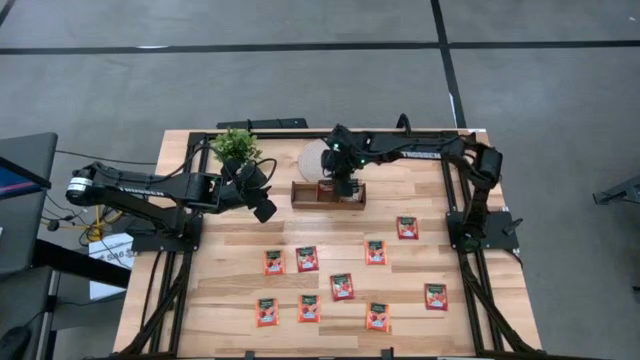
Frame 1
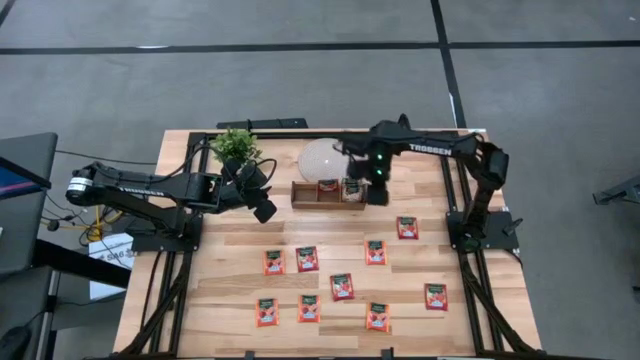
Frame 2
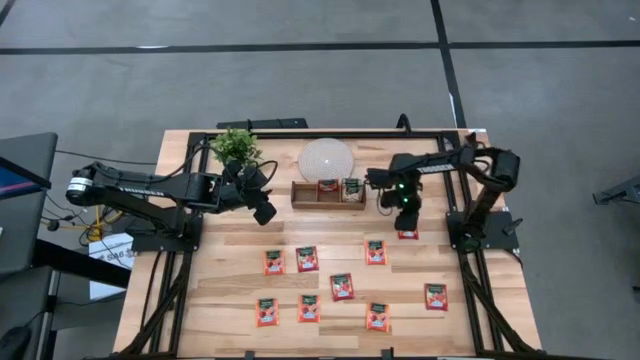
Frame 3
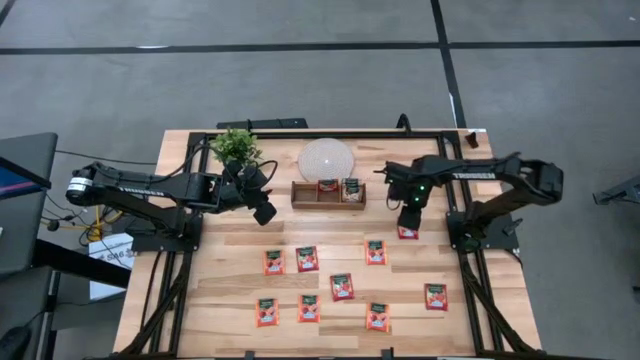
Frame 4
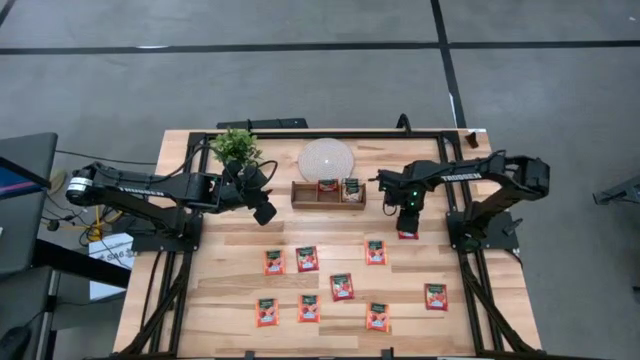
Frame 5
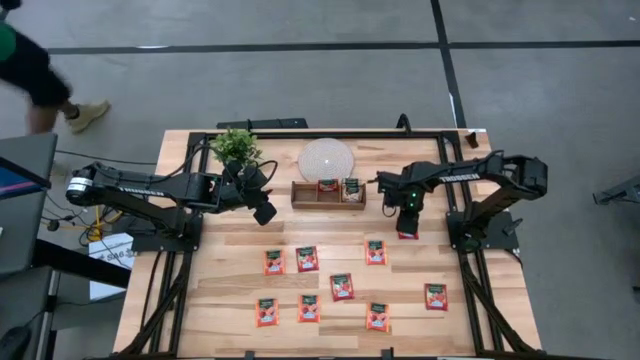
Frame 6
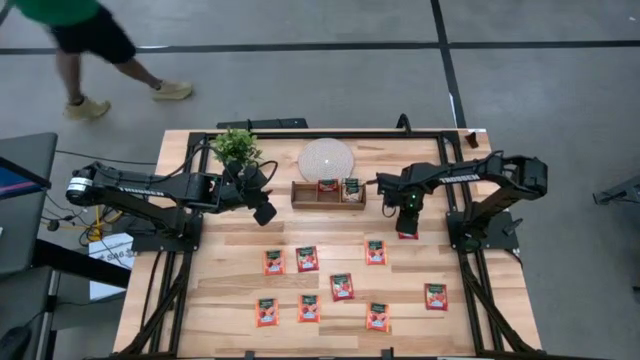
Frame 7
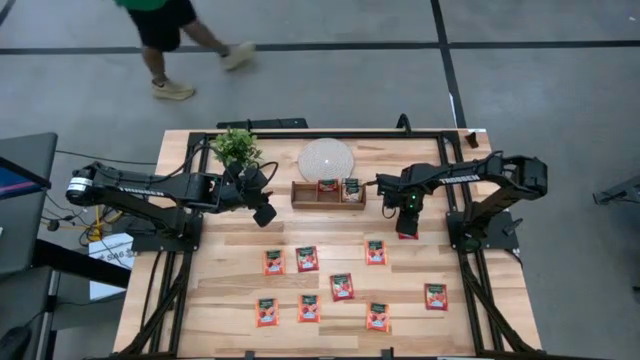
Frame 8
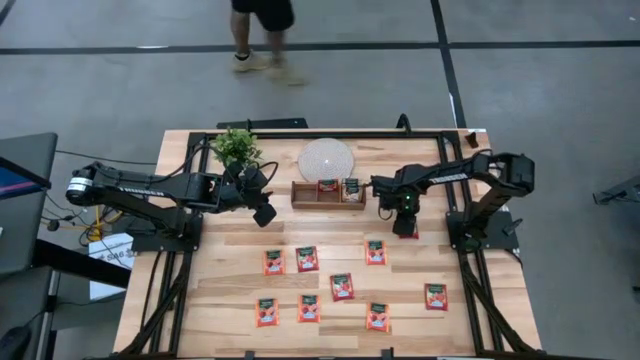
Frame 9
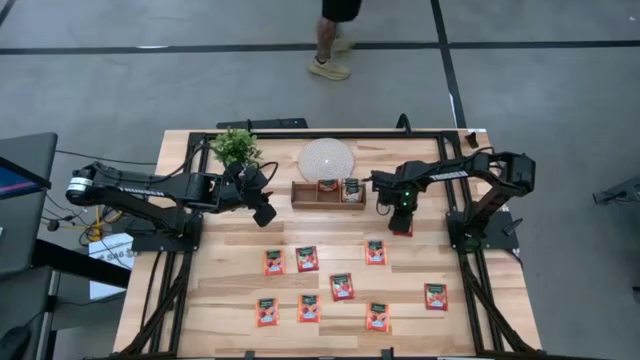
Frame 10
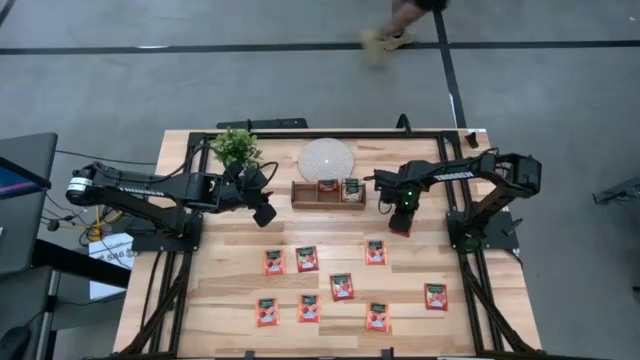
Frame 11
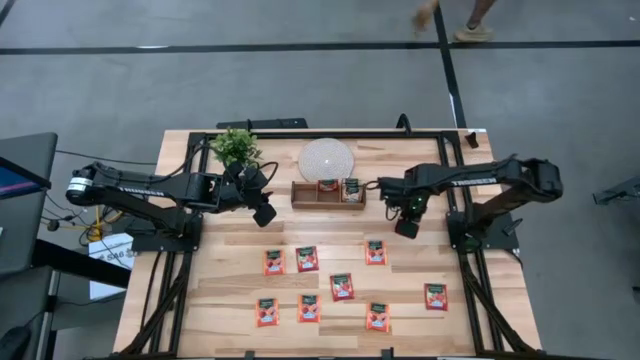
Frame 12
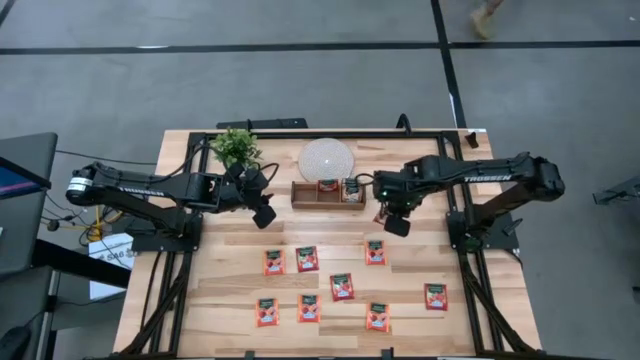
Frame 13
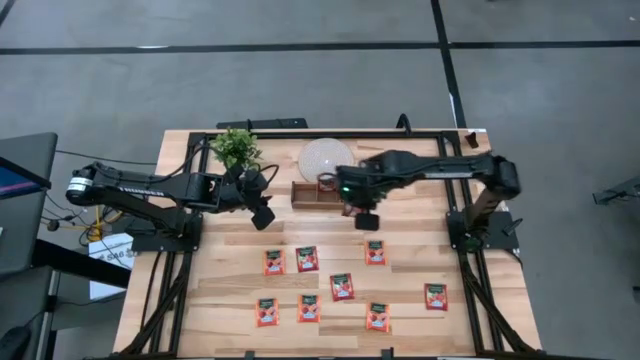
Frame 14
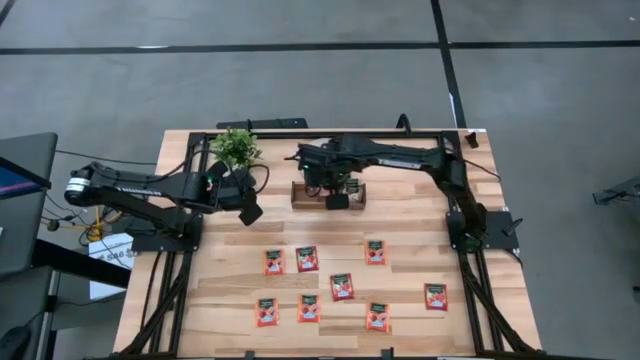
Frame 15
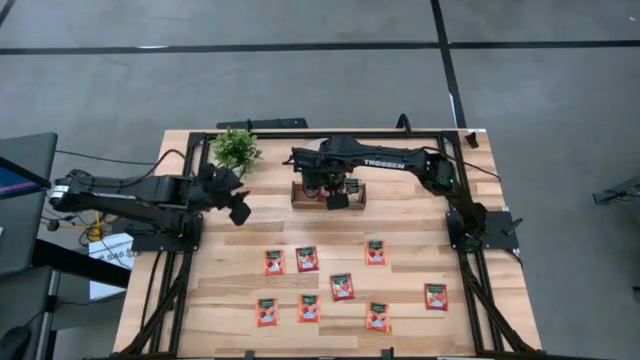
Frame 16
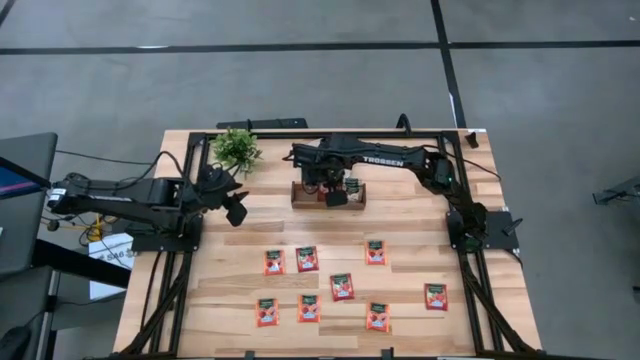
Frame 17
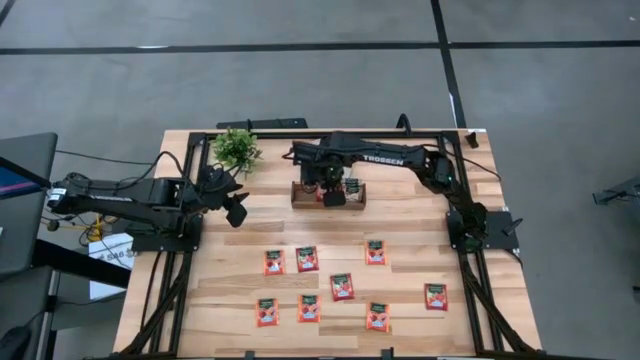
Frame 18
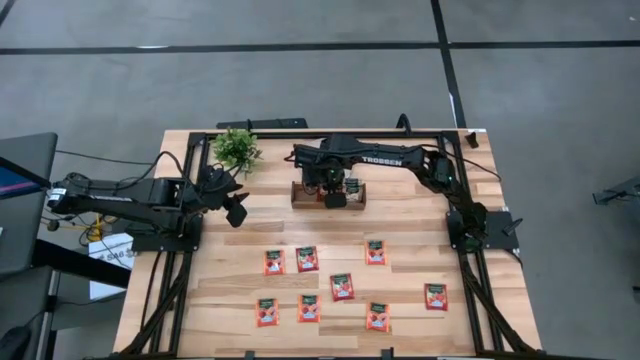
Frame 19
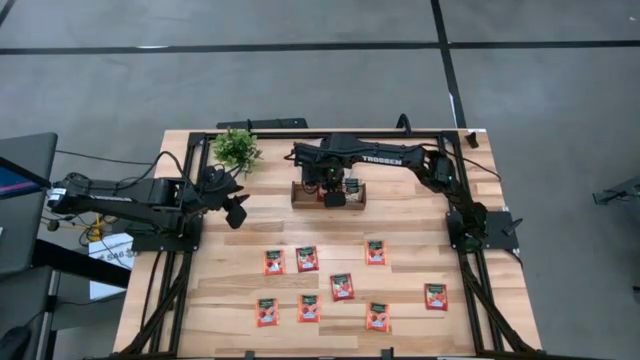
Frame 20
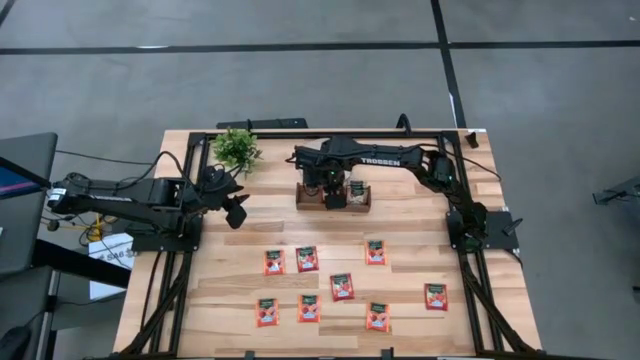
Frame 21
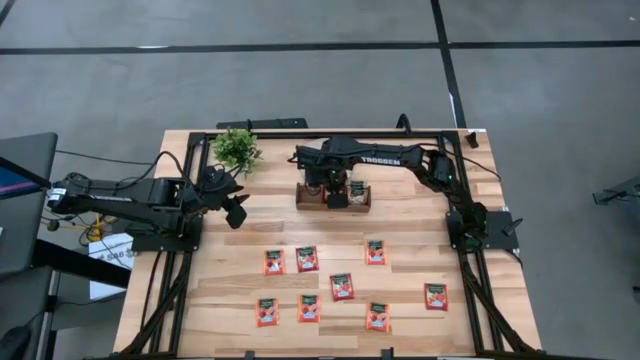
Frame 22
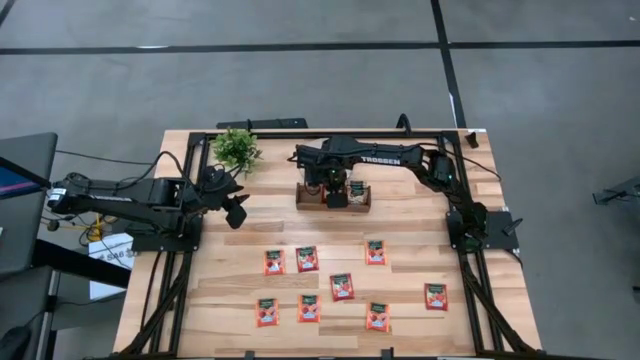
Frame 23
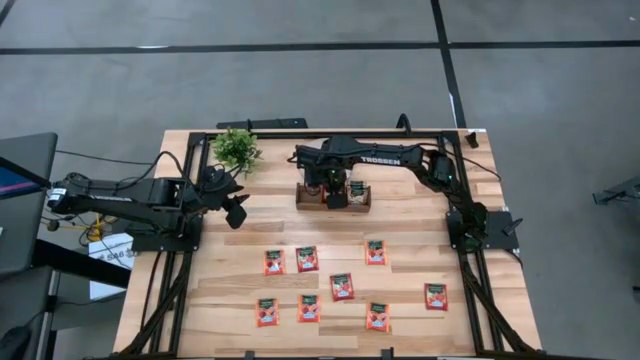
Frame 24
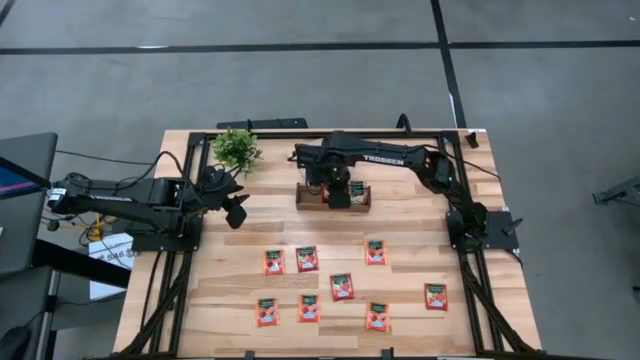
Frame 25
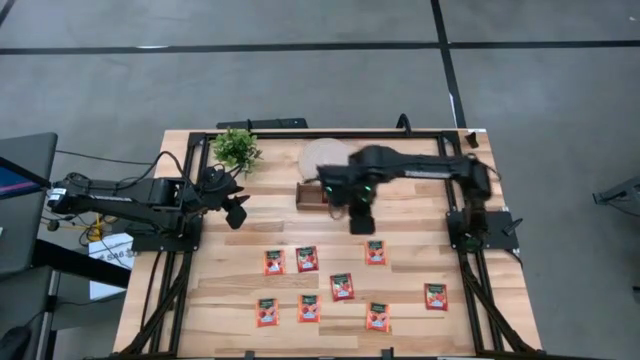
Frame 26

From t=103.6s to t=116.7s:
Task: Pick & Place Tea
Put the red tea bag into the middle section of the wooden organizer

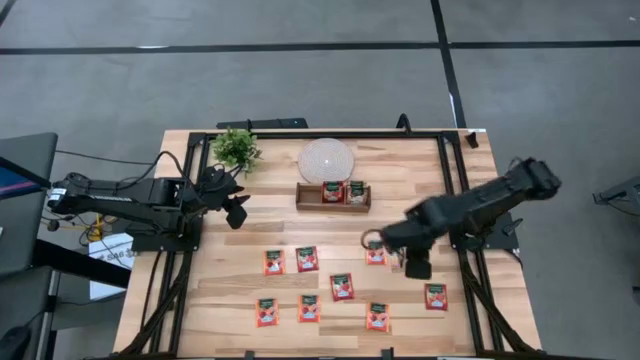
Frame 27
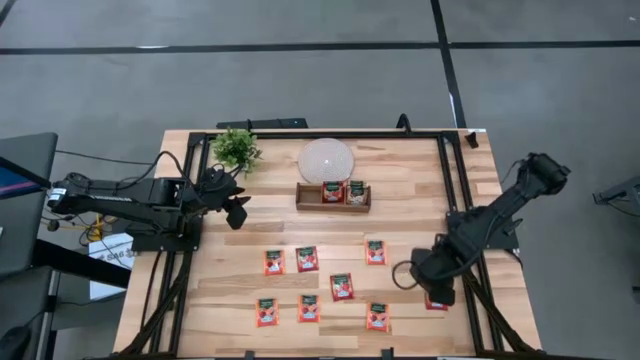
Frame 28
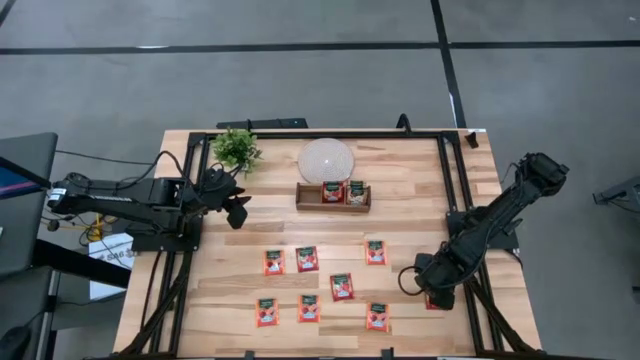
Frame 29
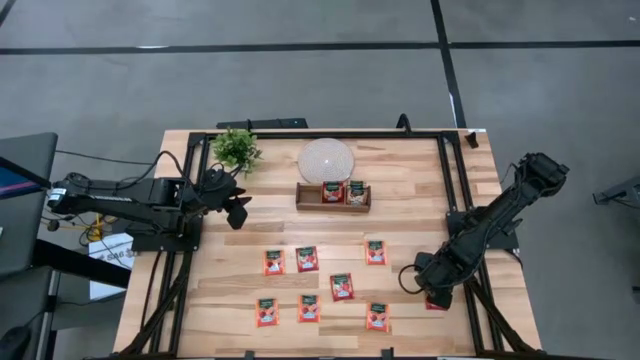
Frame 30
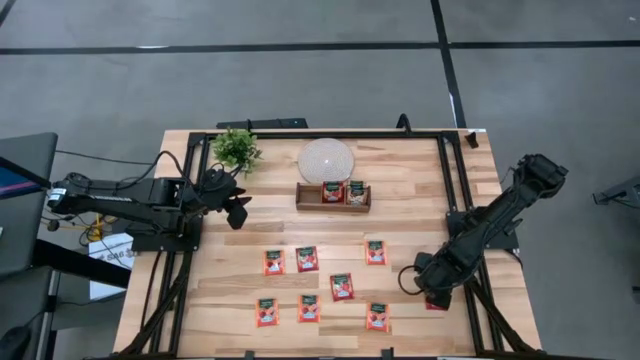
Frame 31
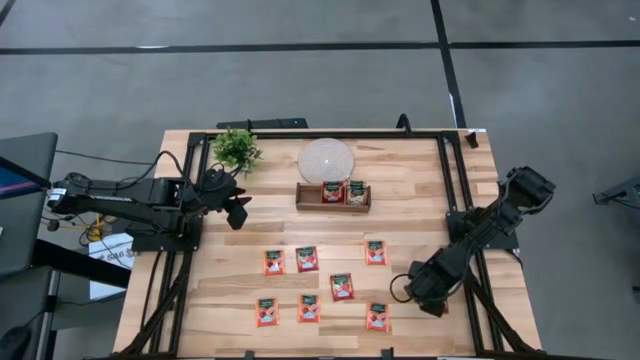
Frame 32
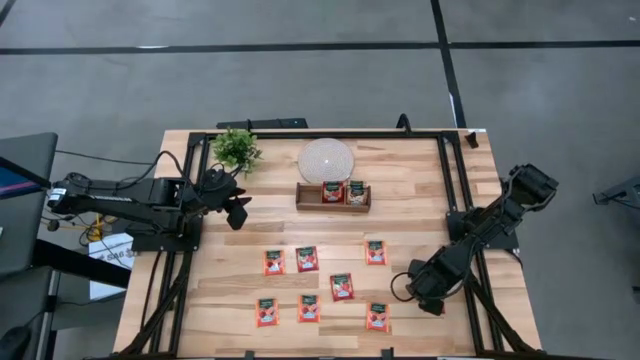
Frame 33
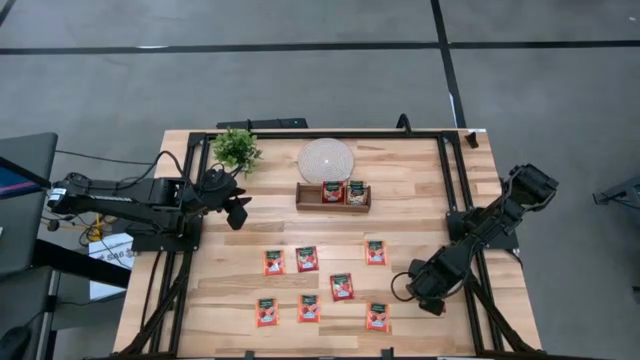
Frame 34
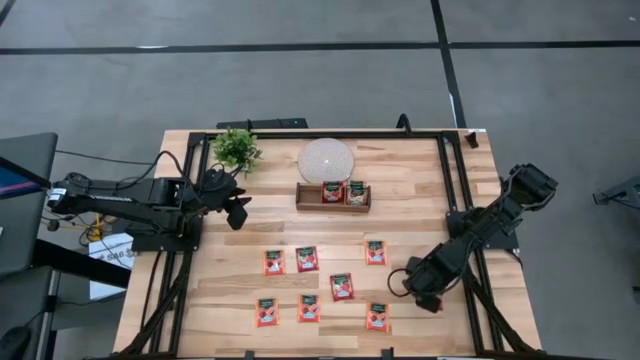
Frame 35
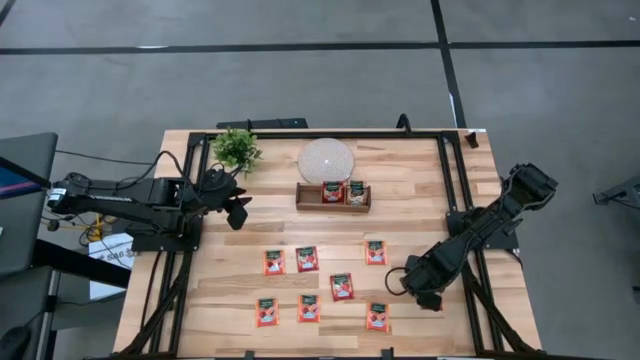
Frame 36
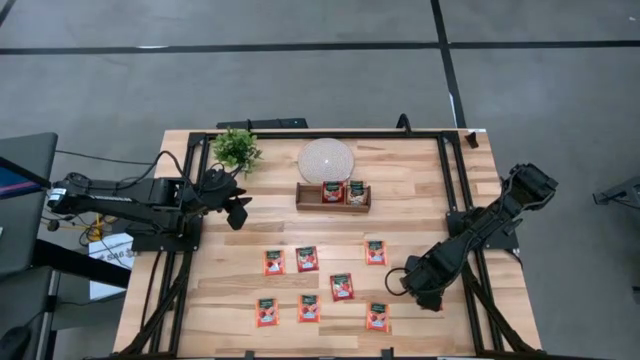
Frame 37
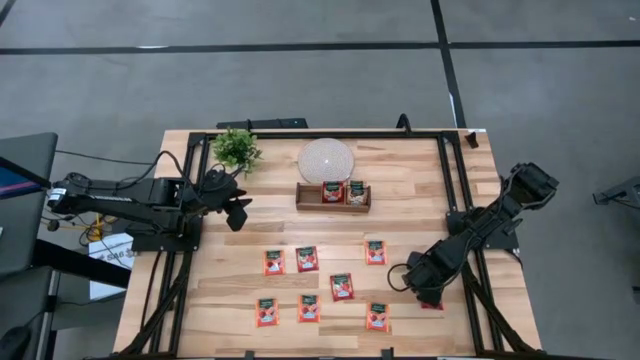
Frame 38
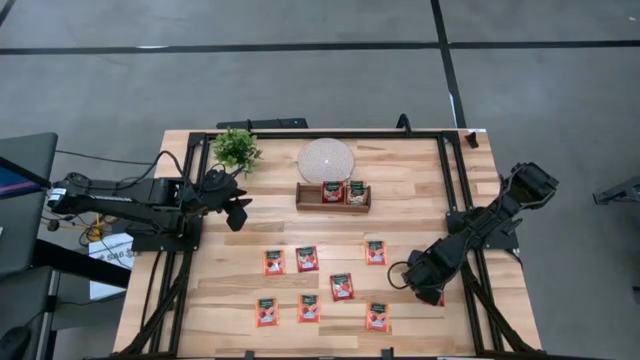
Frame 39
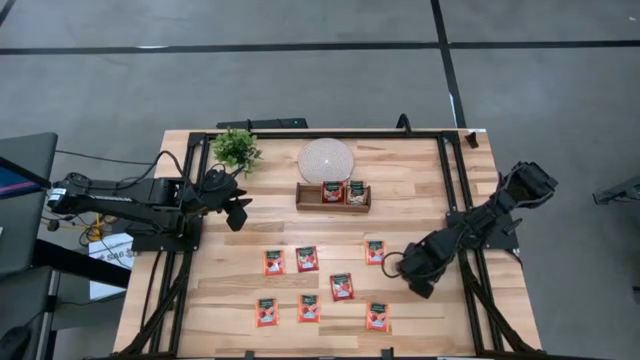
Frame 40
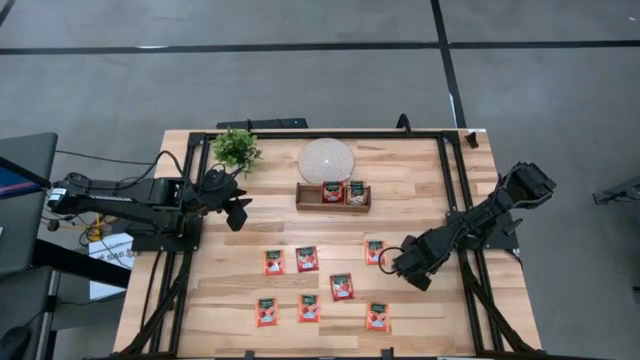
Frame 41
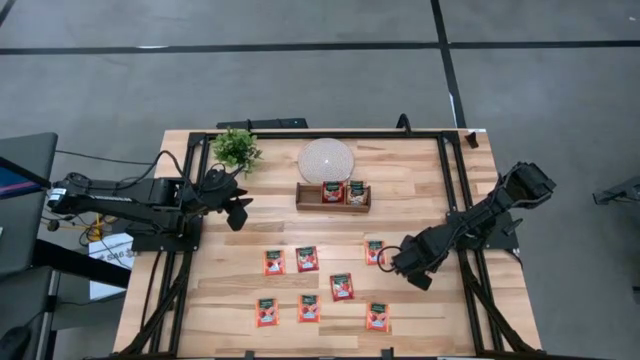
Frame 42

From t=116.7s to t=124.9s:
Put the red tea bag into the middle section of the wooden organizer
